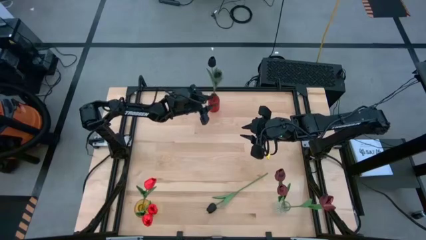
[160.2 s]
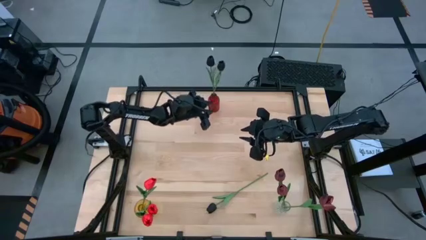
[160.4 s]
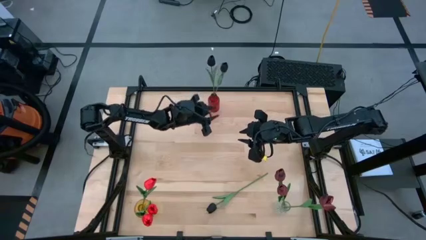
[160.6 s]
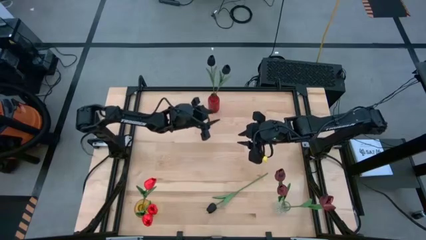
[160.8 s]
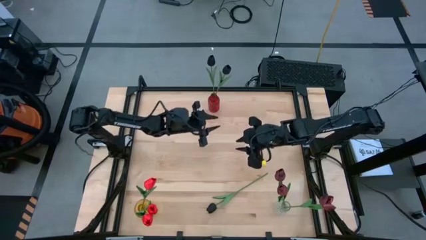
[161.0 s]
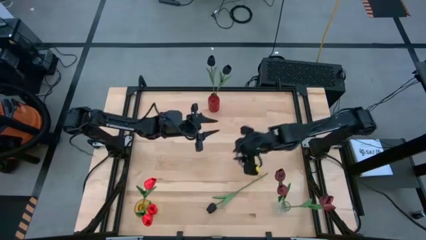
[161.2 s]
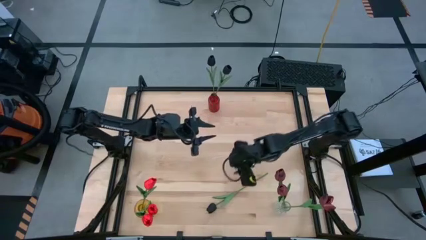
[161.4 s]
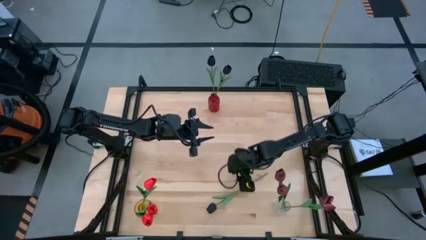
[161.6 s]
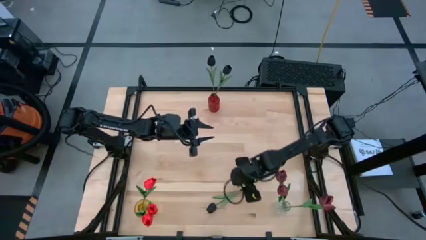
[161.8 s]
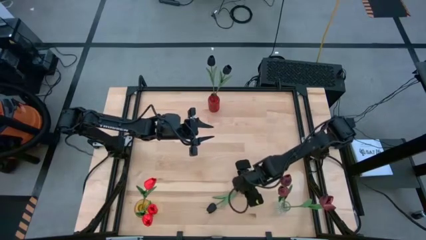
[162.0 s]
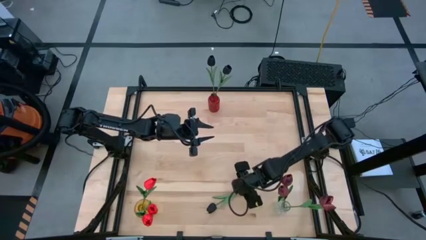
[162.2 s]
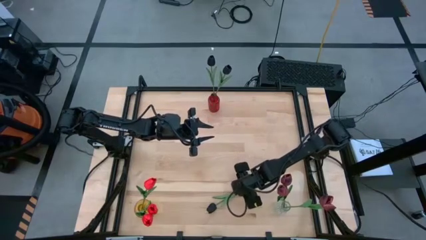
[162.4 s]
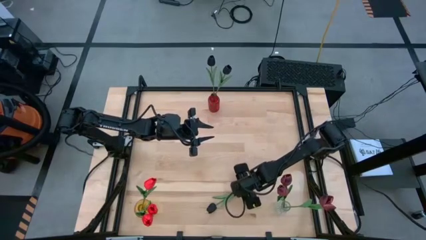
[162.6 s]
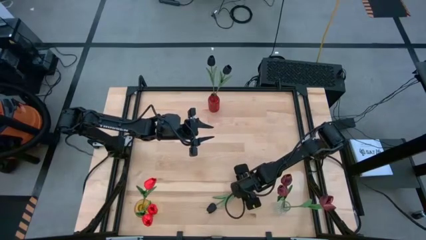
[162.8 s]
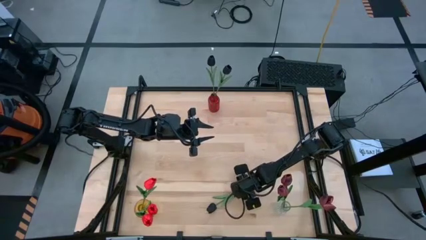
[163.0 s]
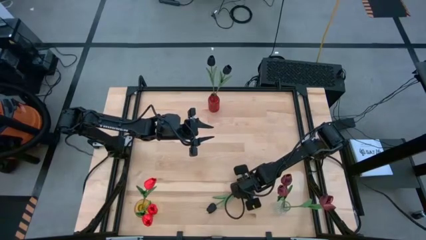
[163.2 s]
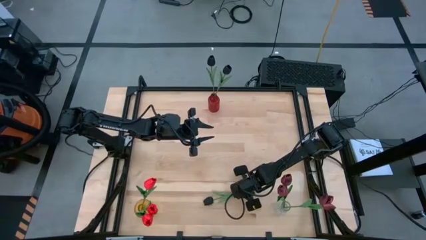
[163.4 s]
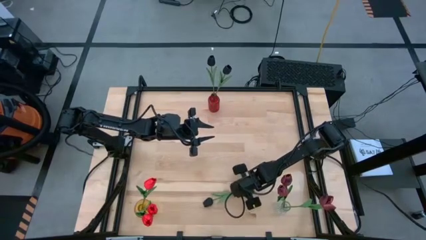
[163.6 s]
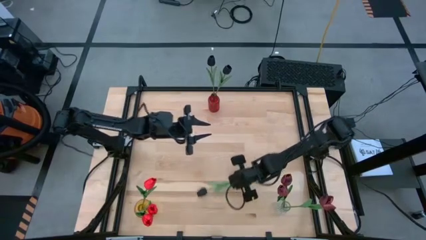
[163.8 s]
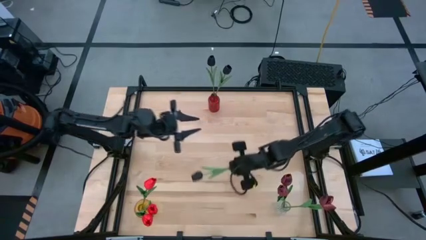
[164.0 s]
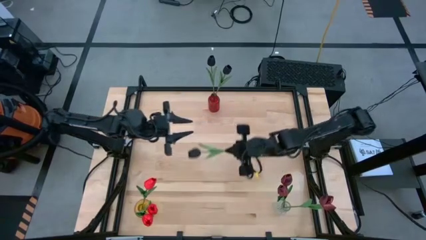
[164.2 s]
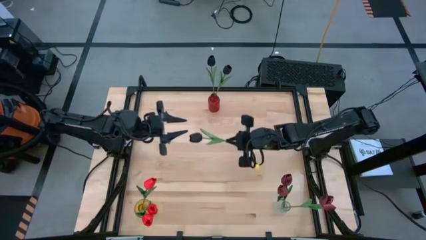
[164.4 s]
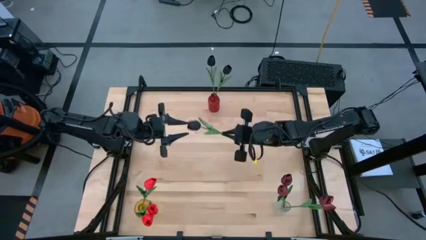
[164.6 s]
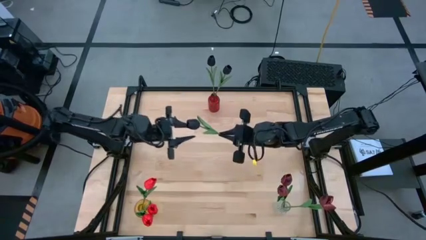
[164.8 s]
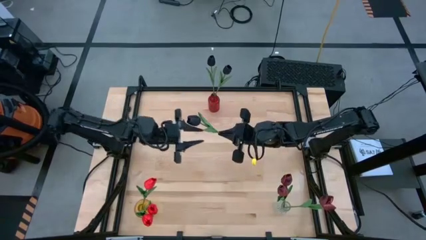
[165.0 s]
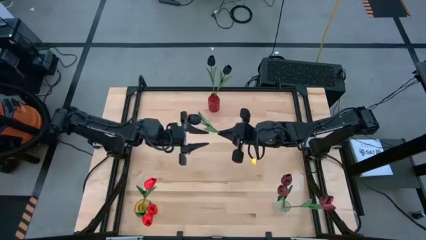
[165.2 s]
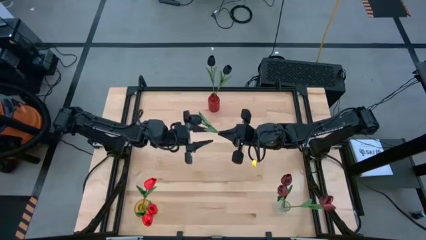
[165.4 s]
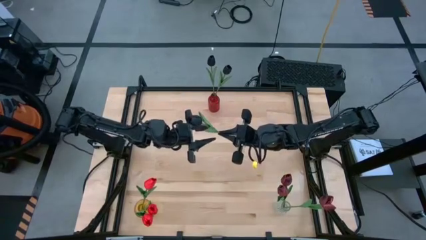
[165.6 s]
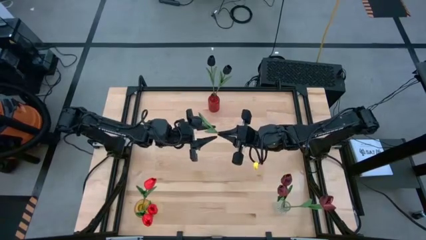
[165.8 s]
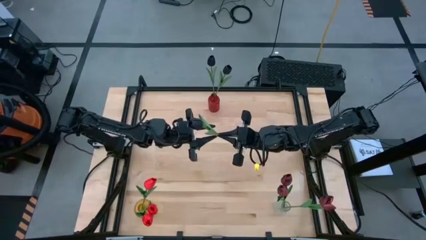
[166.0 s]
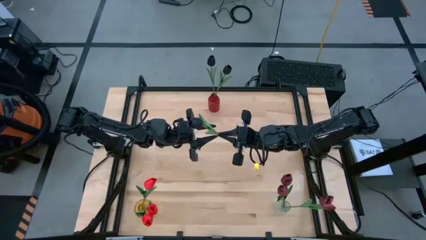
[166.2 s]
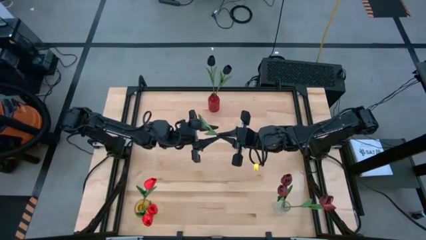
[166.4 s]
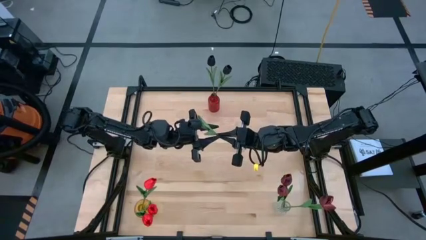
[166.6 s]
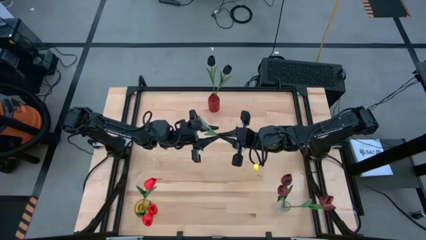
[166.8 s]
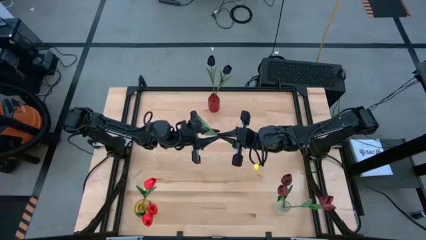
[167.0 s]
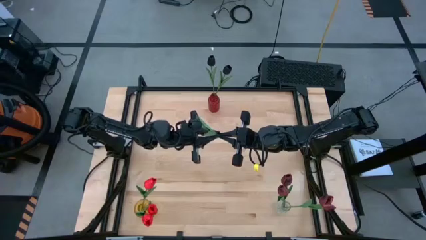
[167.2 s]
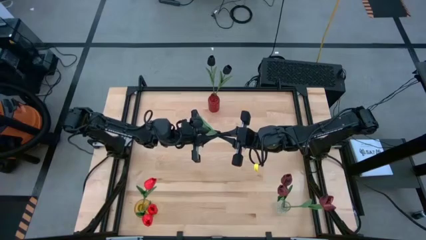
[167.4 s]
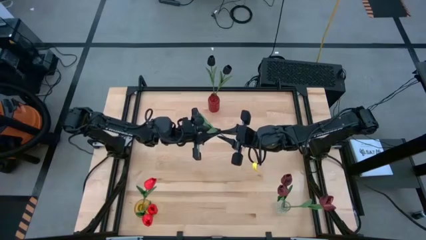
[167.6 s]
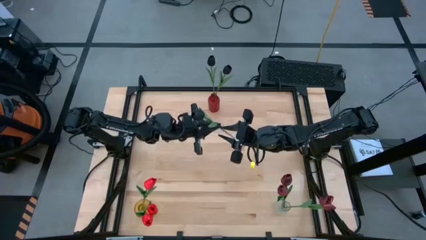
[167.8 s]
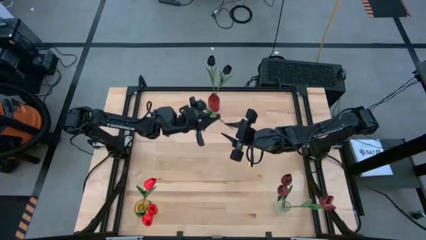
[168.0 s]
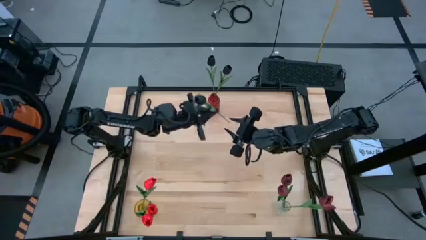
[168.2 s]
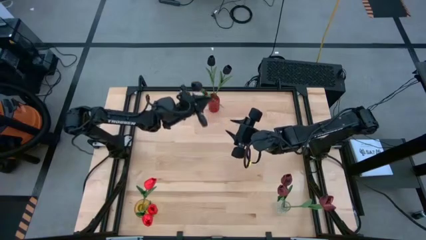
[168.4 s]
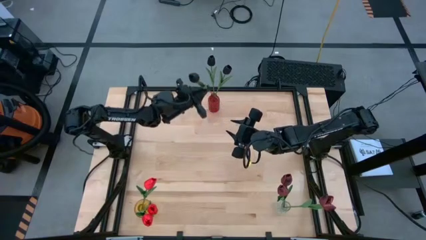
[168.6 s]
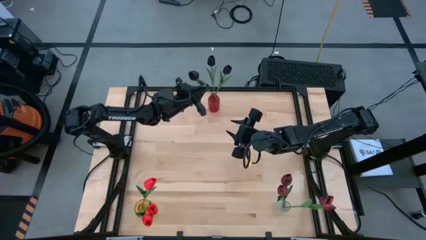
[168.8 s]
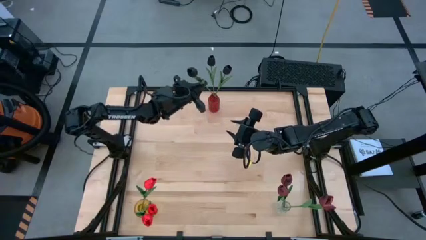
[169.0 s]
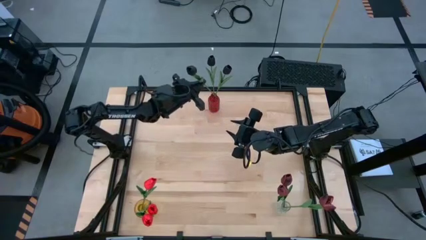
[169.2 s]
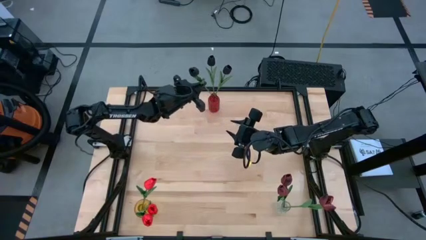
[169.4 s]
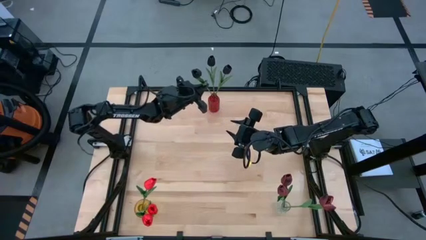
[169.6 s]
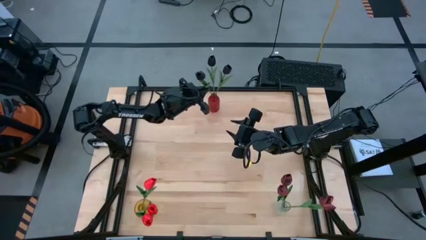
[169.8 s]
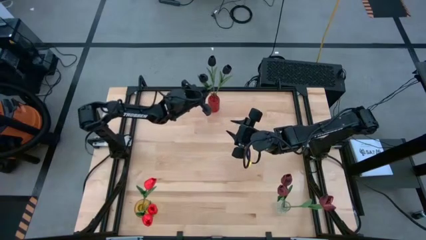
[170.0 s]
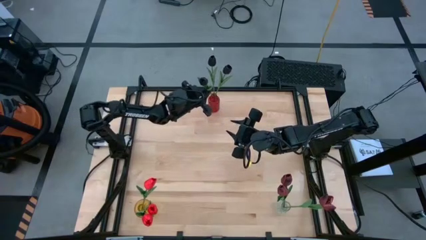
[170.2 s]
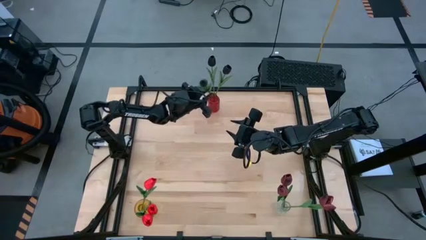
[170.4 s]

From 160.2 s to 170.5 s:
Task: Sort flowers into vase by color
Put the black flower into the red vase

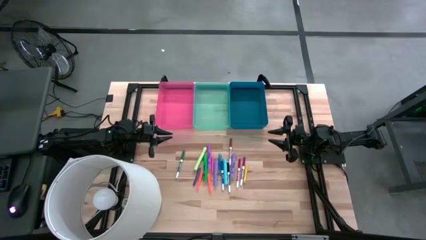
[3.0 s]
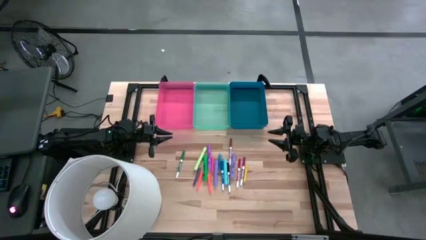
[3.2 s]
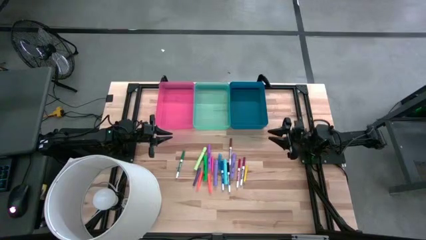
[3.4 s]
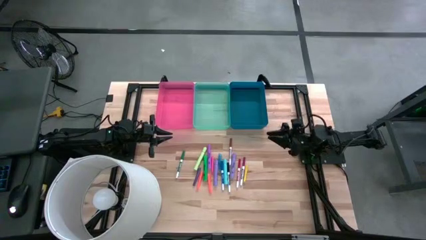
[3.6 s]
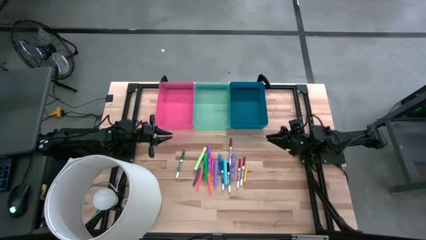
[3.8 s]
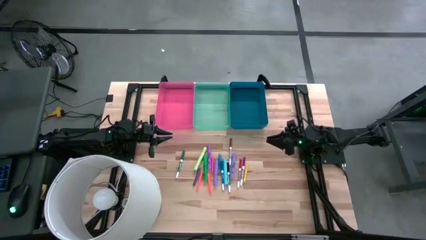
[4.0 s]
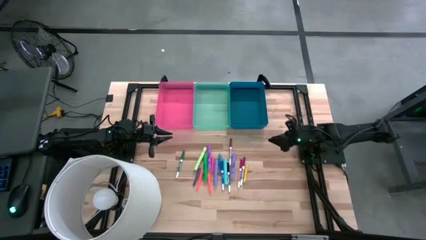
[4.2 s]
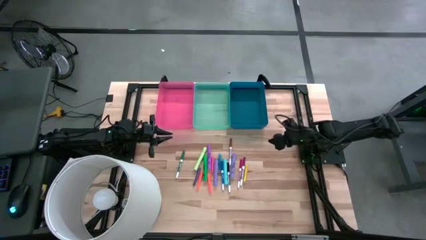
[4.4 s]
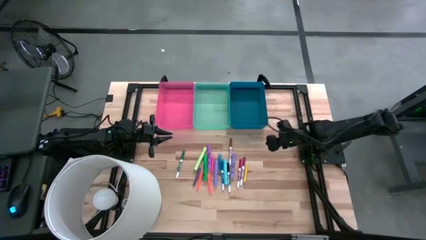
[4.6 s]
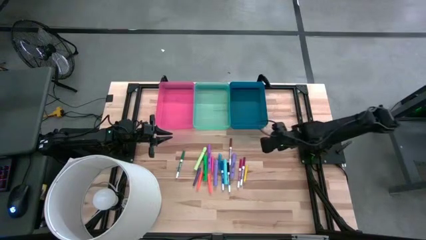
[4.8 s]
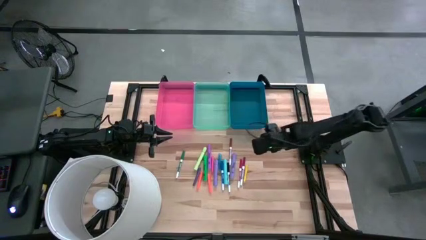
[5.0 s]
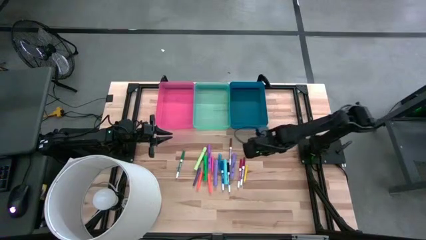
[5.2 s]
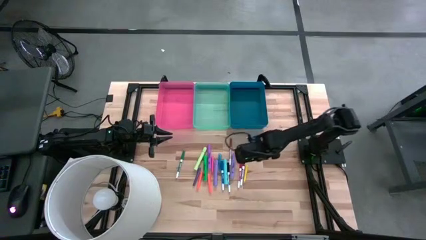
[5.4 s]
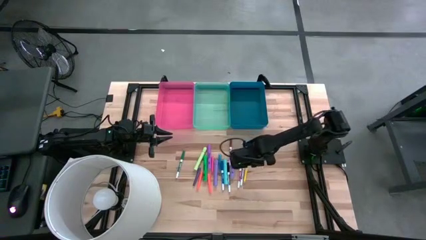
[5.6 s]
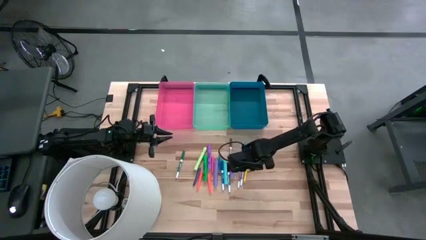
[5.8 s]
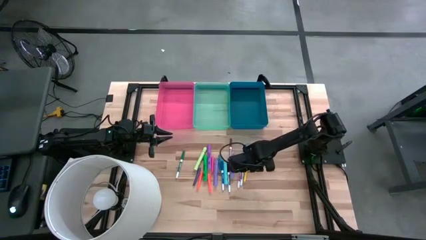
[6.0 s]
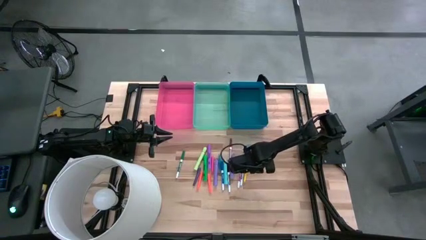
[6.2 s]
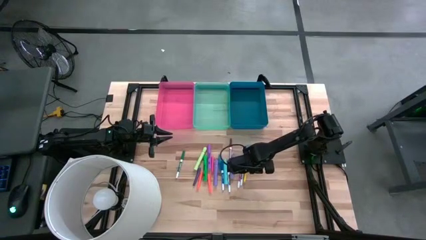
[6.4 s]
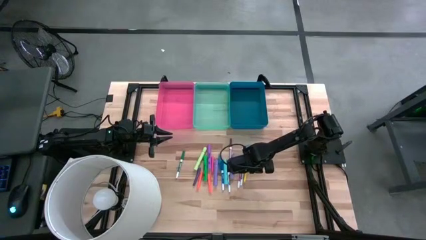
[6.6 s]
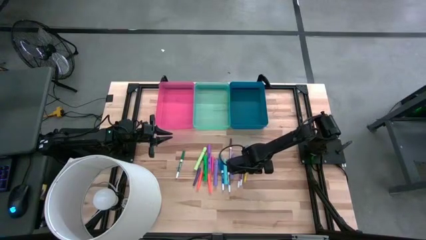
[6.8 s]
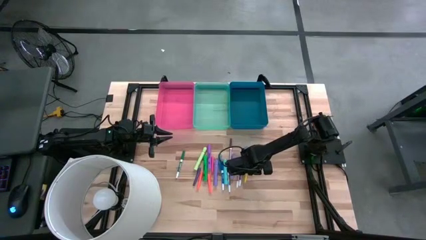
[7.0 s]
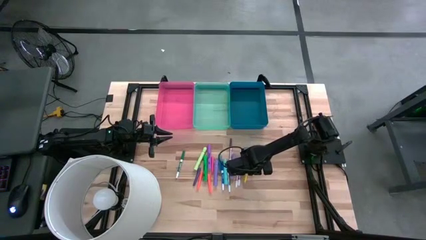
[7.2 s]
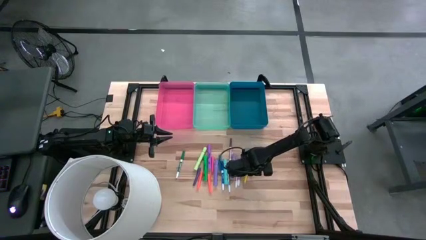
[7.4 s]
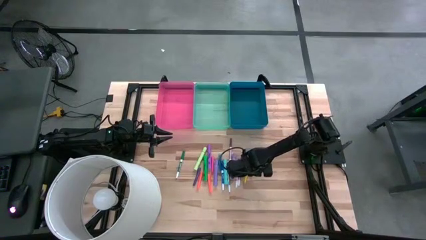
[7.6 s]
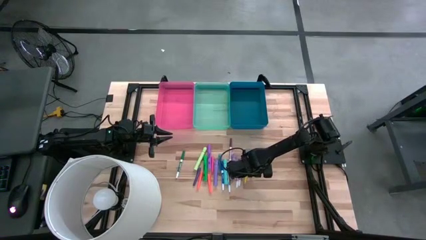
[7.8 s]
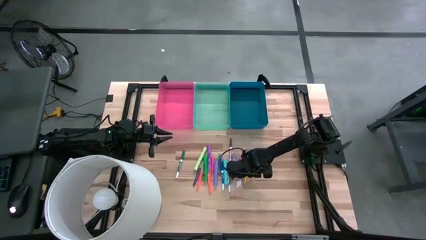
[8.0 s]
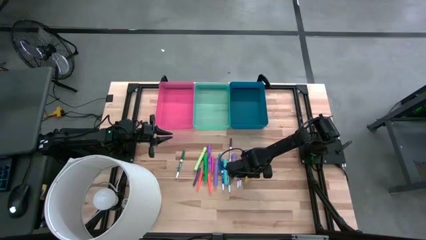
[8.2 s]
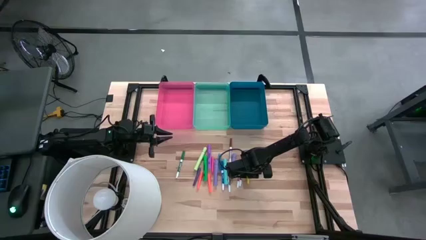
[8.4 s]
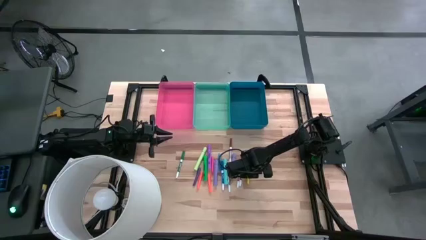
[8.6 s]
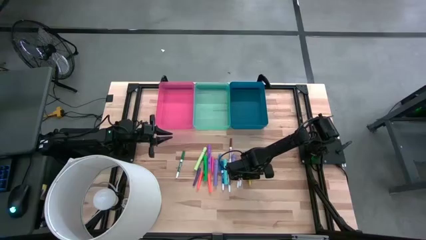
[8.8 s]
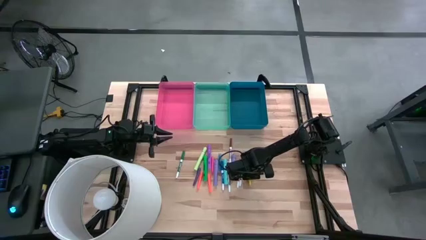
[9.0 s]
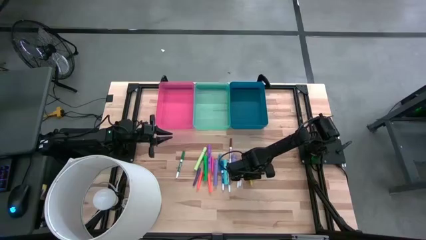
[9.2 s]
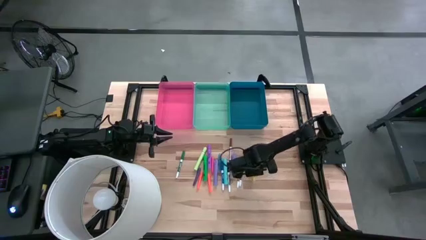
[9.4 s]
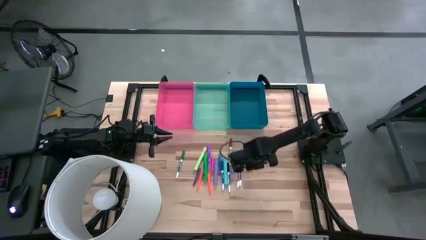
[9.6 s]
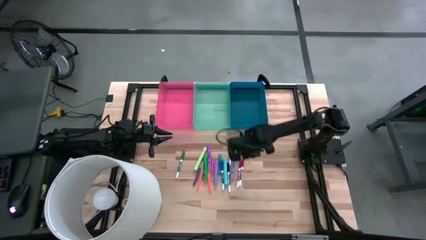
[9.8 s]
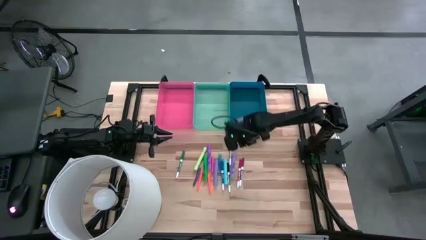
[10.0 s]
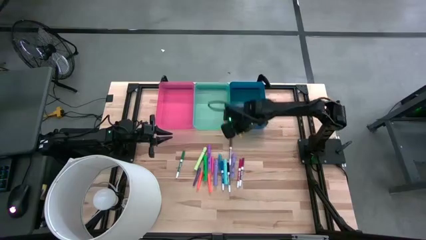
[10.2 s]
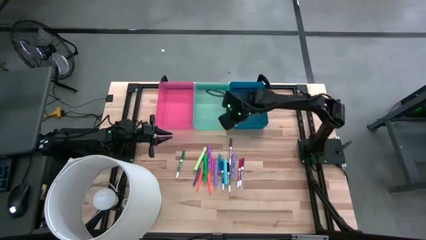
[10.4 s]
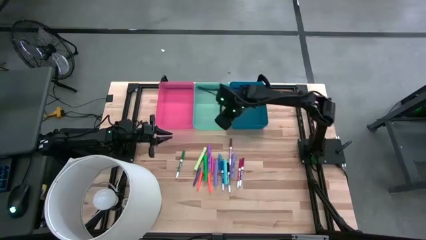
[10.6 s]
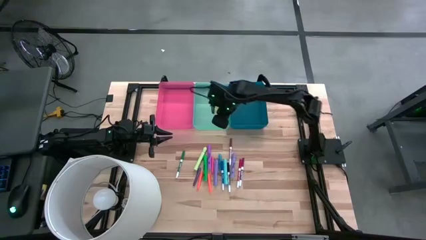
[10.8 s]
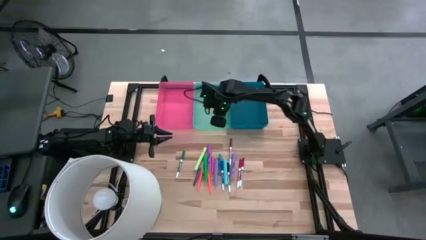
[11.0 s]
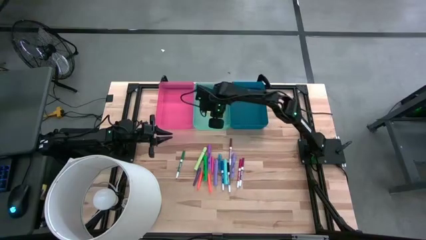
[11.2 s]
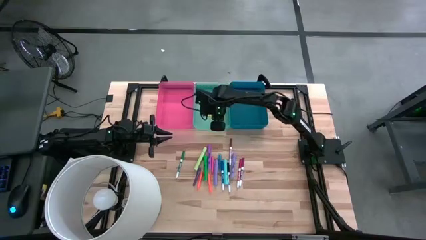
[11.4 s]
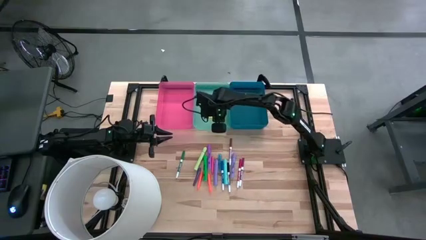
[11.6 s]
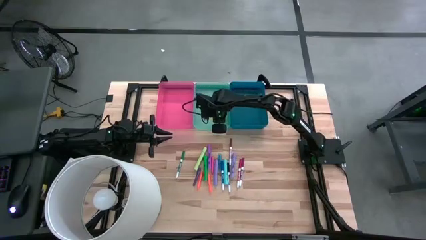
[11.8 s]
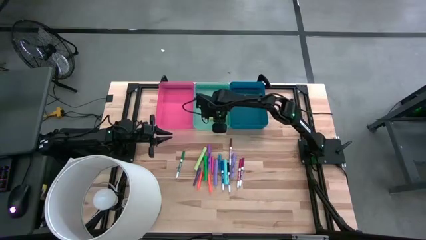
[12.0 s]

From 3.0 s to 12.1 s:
Task: Pick & Place Markers
Put the pen into the green bin
